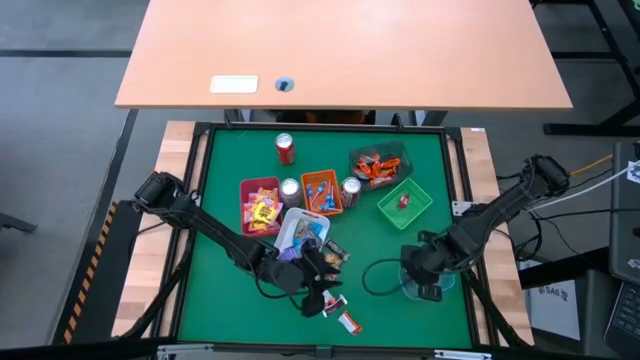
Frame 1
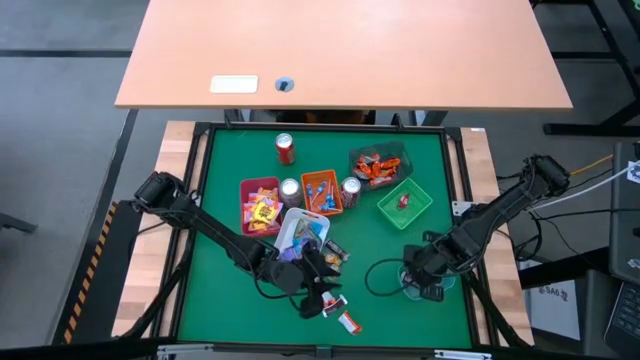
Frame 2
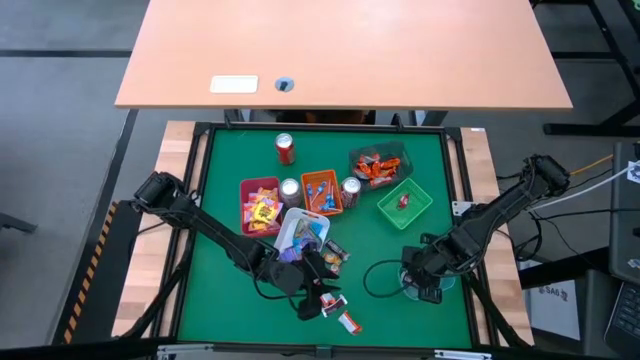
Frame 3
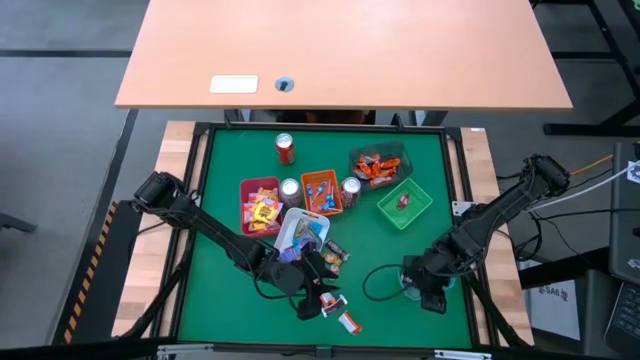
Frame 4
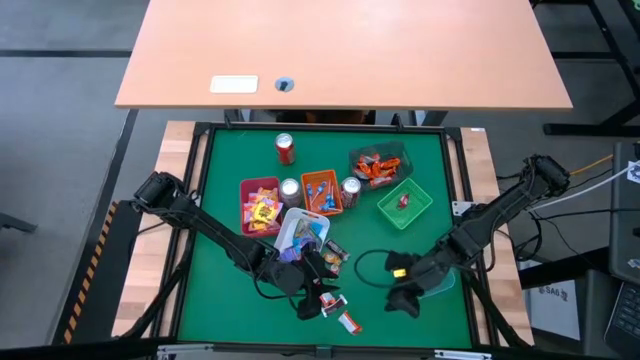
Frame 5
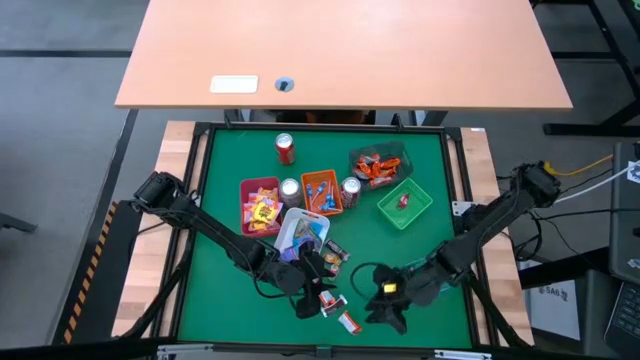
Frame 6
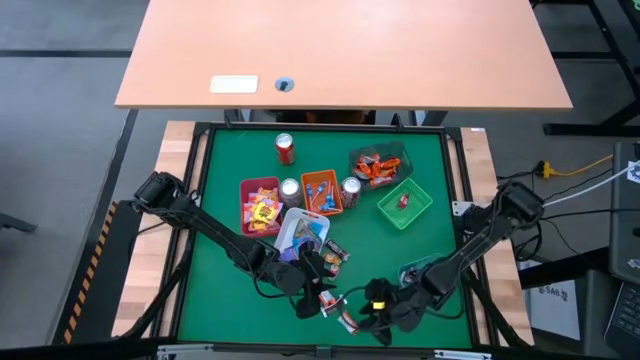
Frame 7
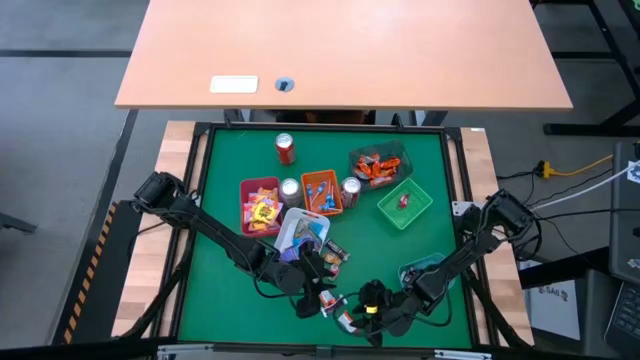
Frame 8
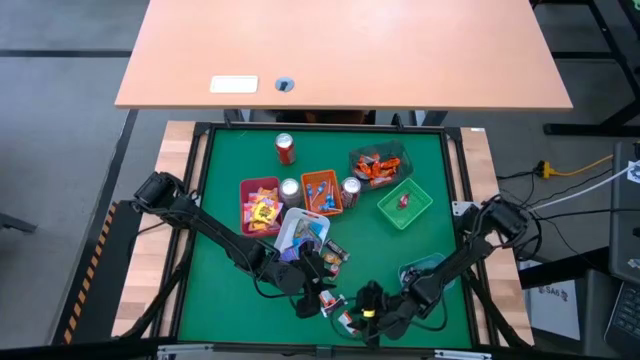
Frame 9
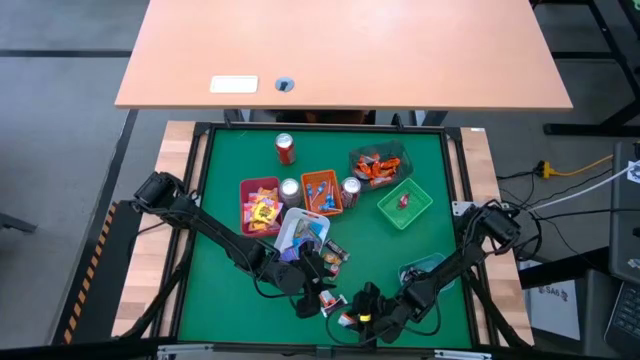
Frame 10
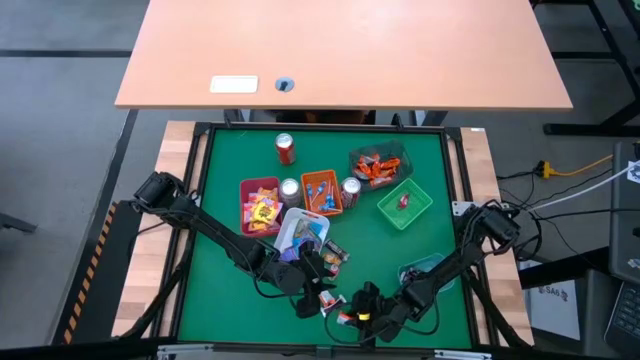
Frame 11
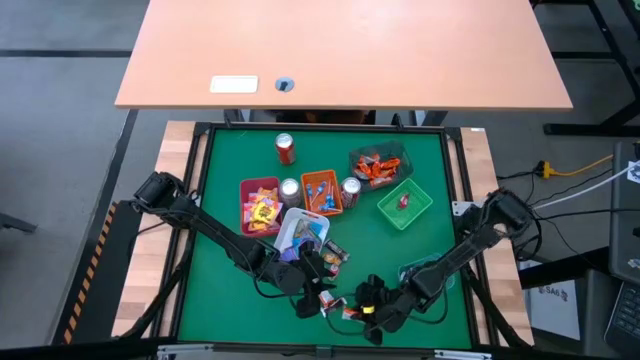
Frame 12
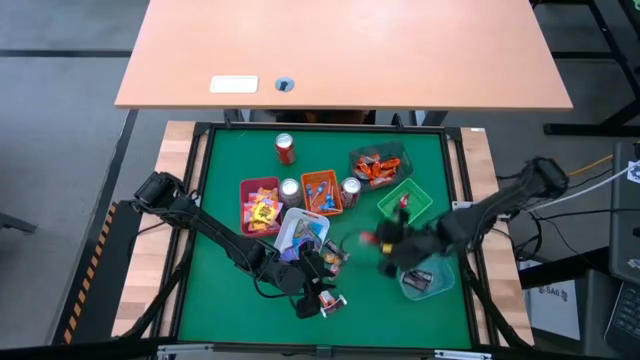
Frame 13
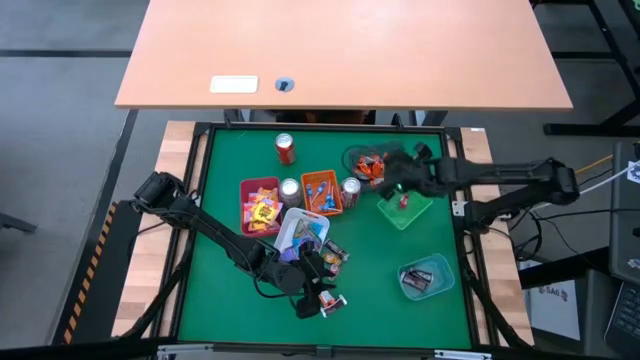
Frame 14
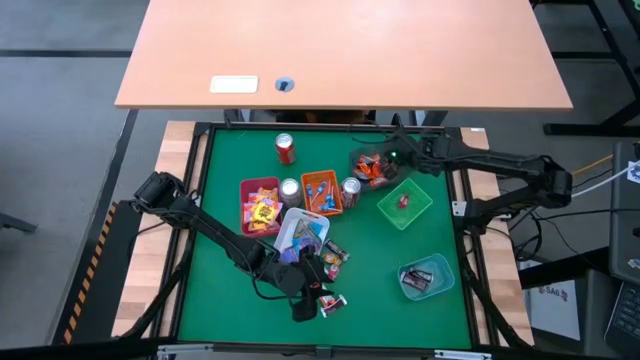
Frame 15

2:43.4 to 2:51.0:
Task: Sort candy
Put the orange candy into the black bin

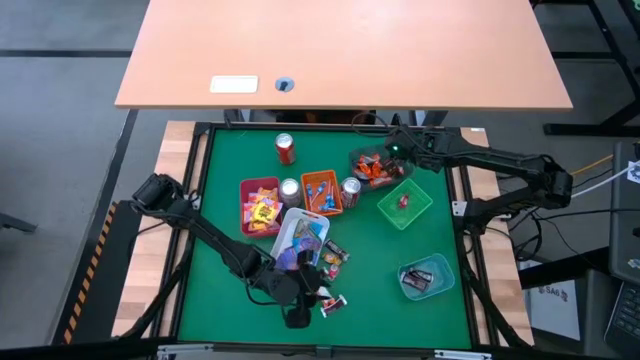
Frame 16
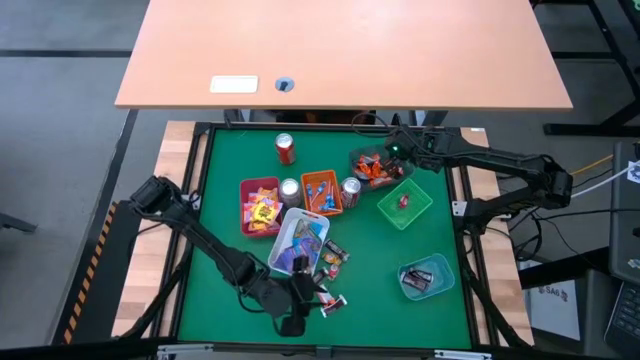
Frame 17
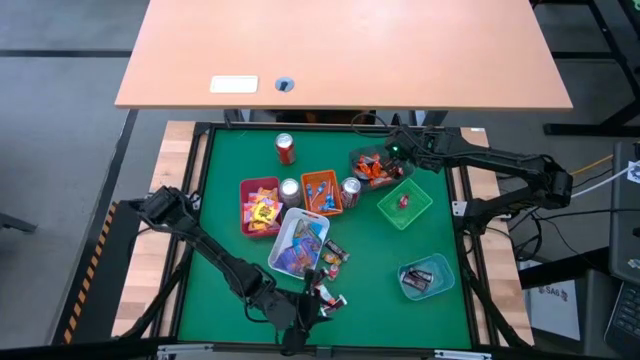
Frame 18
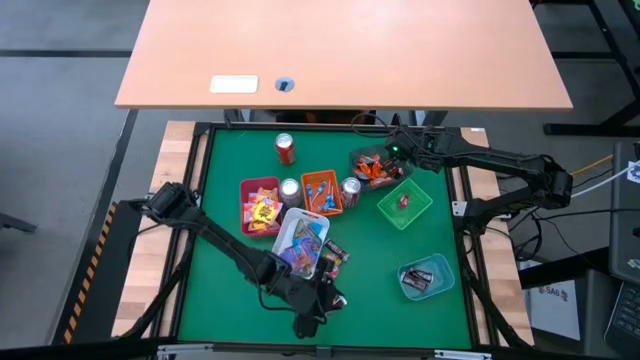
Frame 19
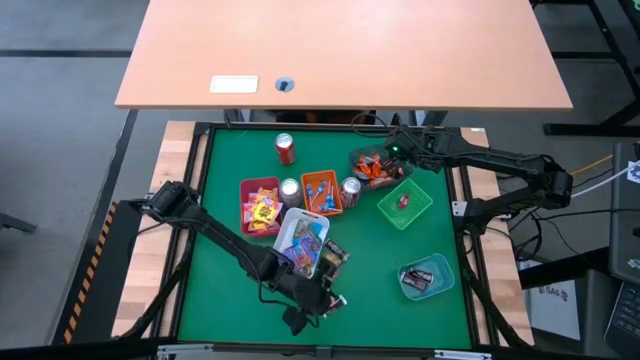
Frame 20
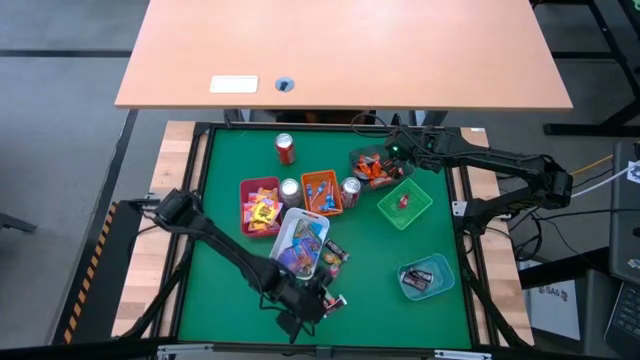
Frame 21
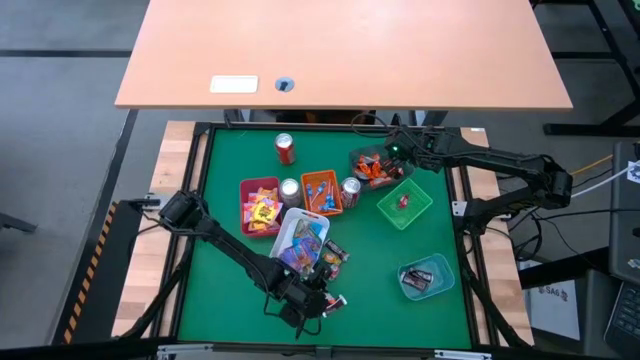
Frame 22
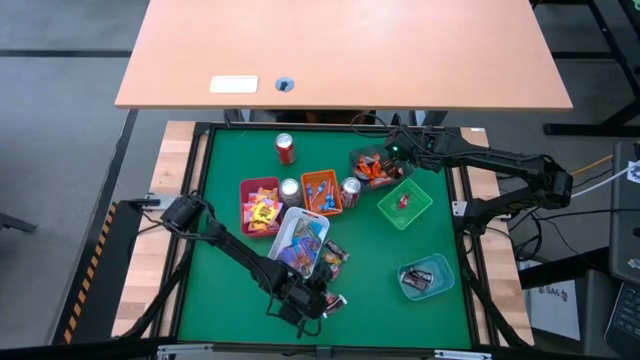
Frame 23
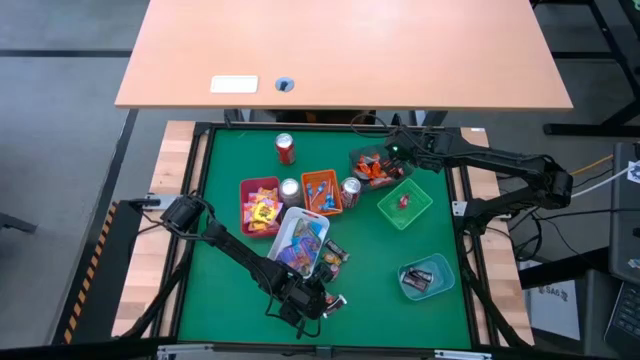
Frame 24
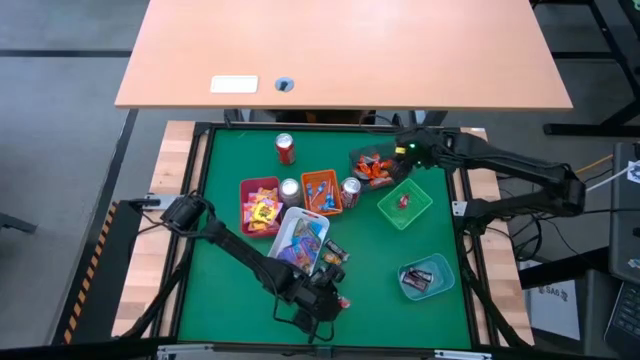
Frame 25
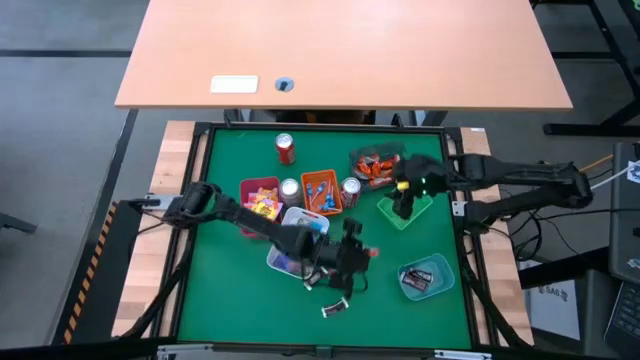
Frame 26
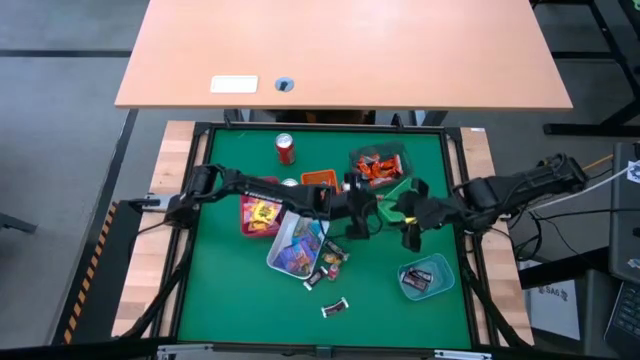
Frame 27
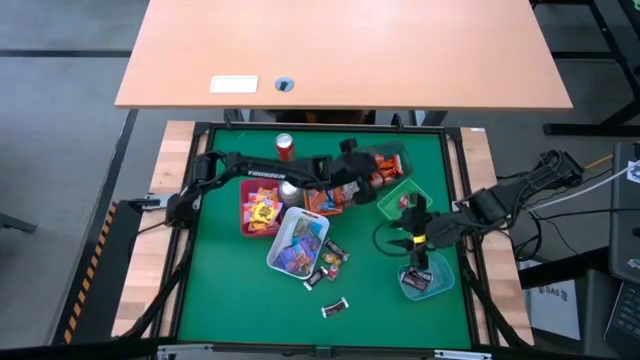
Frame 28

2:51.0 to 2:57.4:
Put the orange candy into the black bin

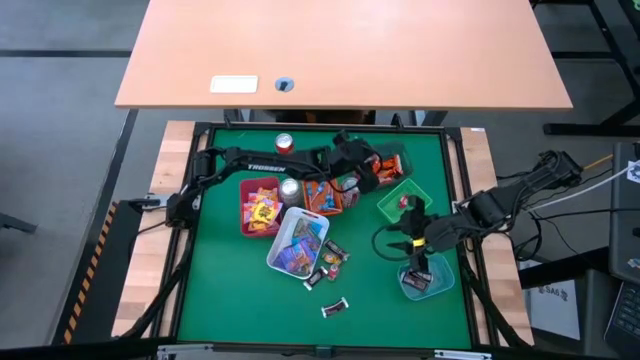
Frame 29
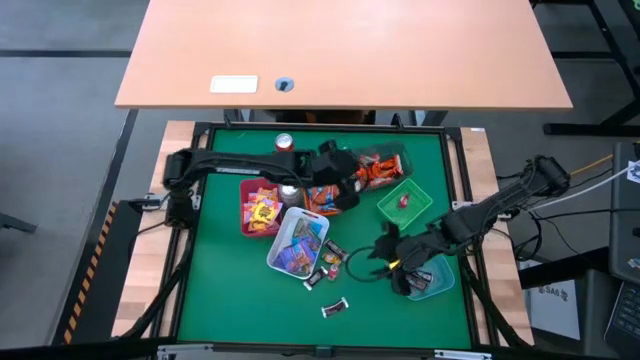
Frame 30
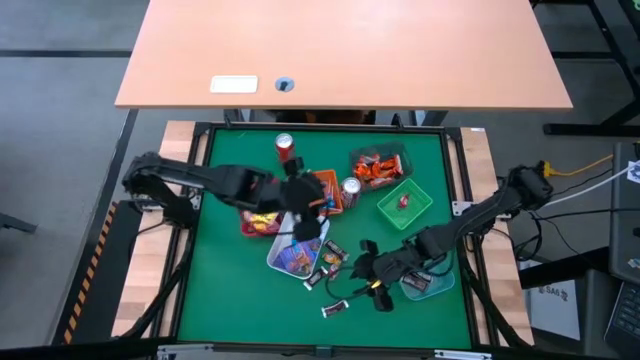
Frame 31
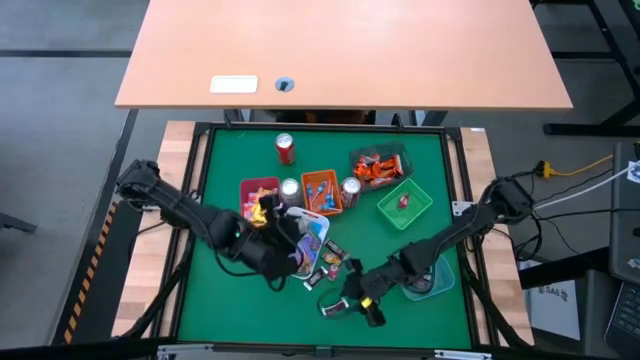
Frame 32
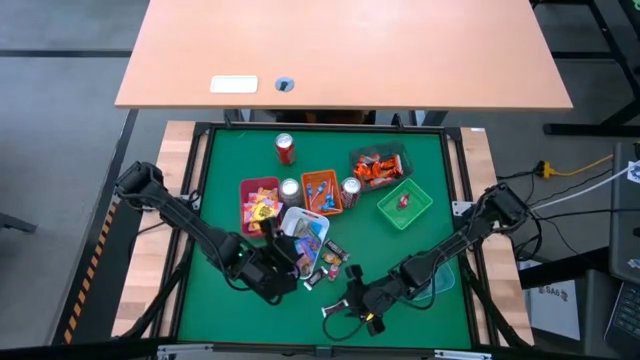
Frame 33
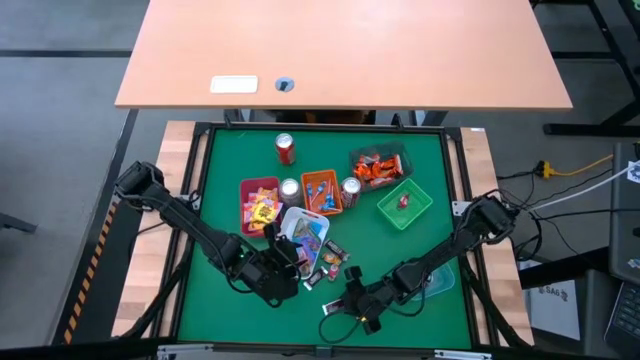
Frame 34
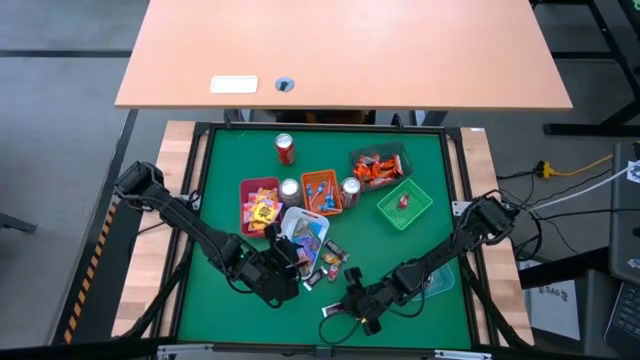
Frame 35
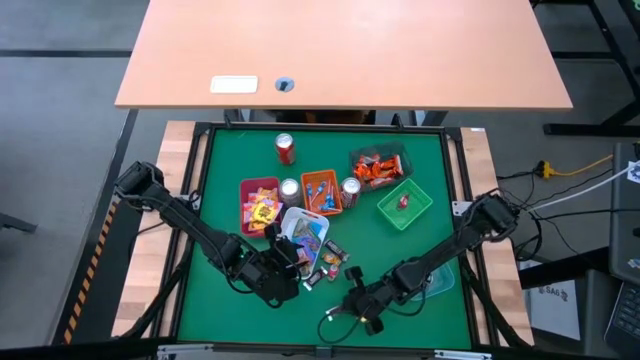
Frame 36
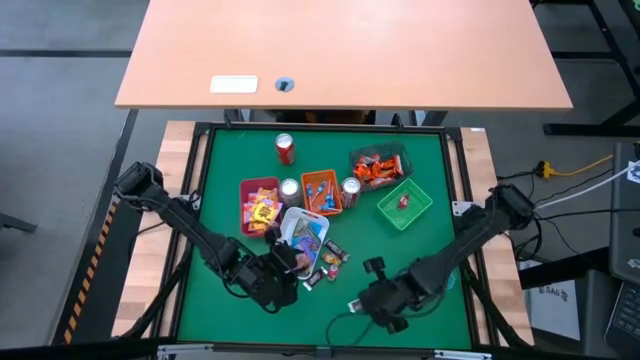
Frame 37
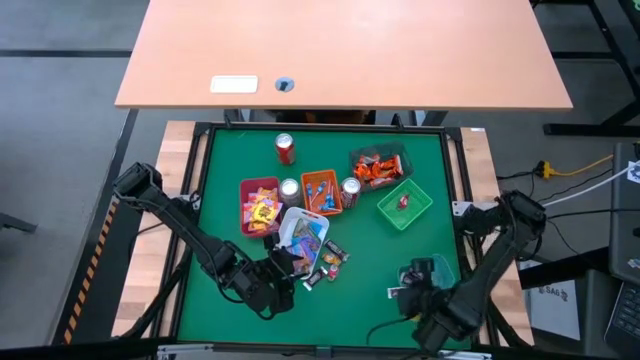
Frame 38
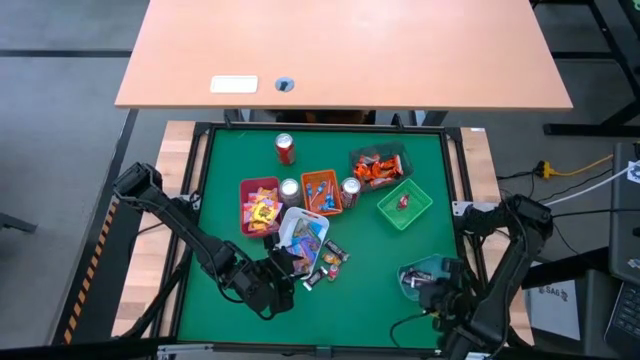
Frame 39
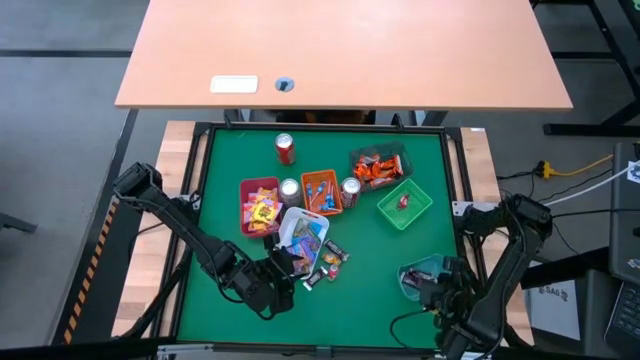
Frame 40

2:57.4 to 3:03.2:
Put the brown chocolate into the blue bin

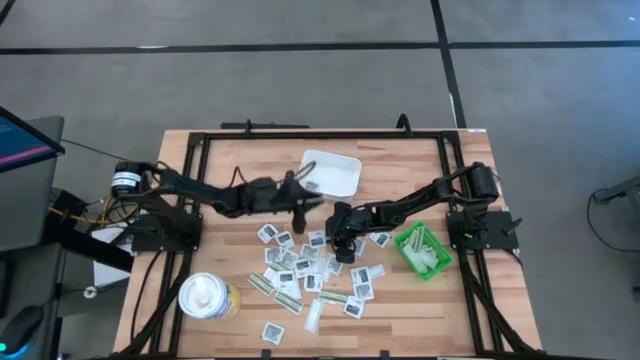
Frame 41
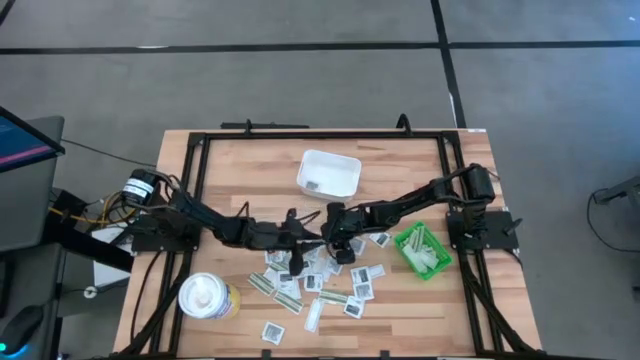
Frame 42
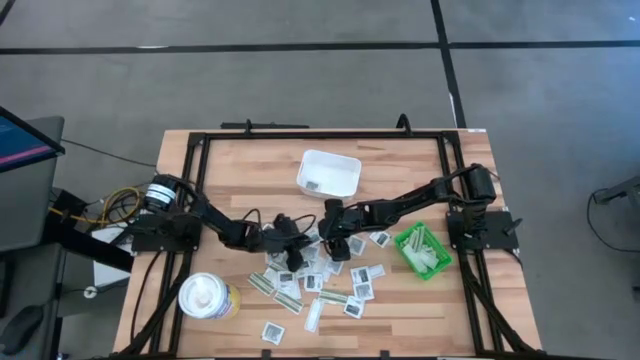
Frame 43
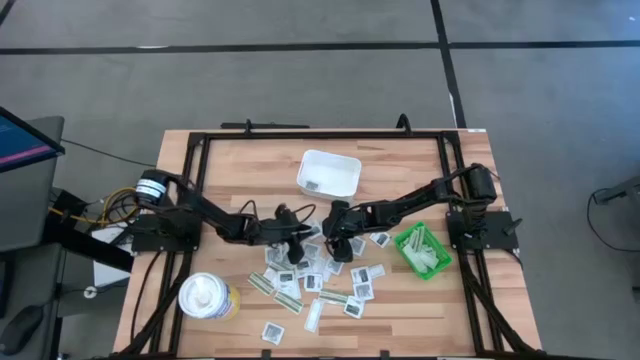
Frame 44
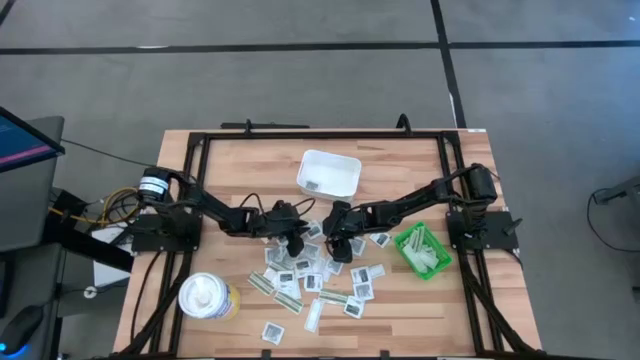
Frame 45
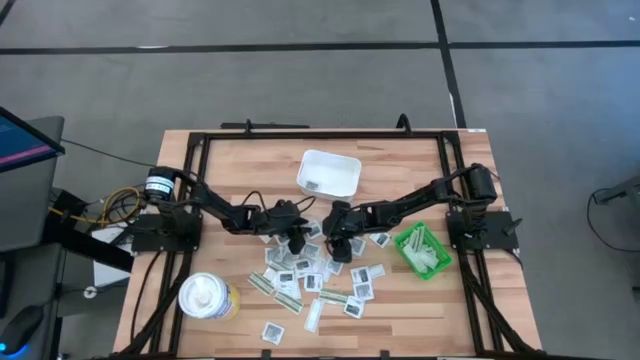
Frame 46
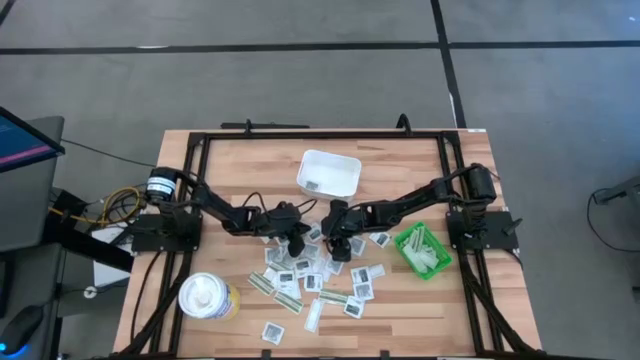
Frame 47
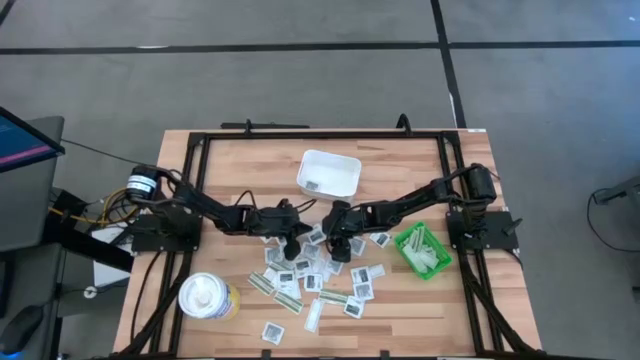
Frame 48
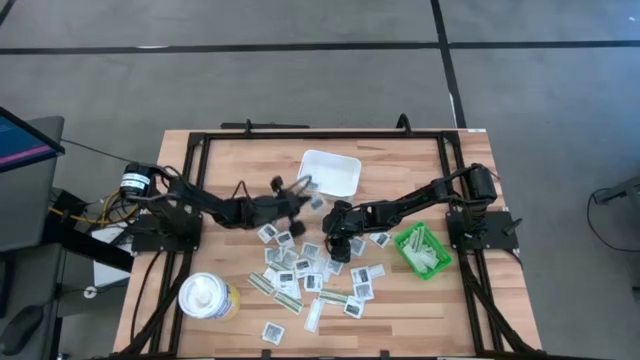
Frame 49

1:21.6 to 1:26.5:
Task: Pick & Place First Aid Supplies
Put the towelette pack into the white bin
